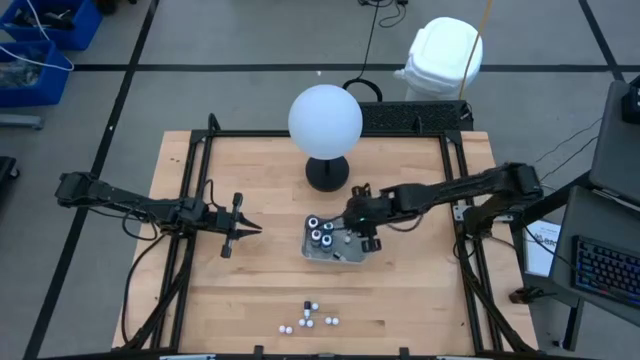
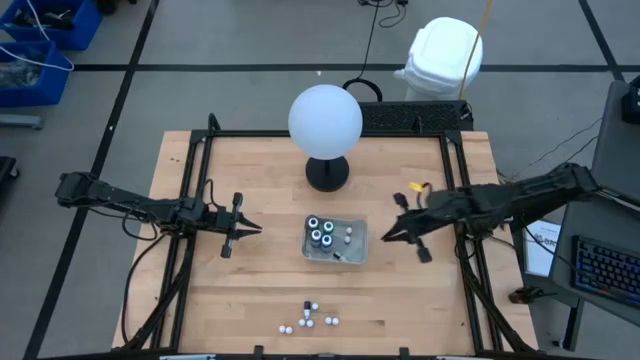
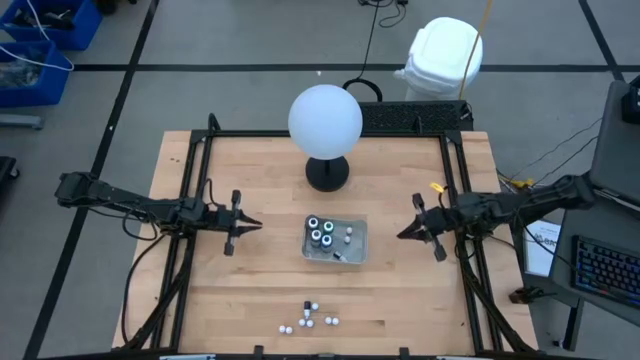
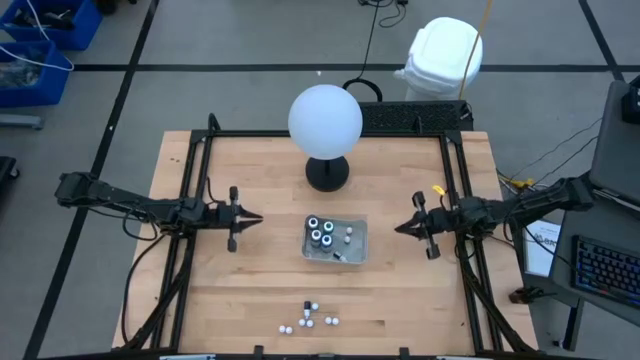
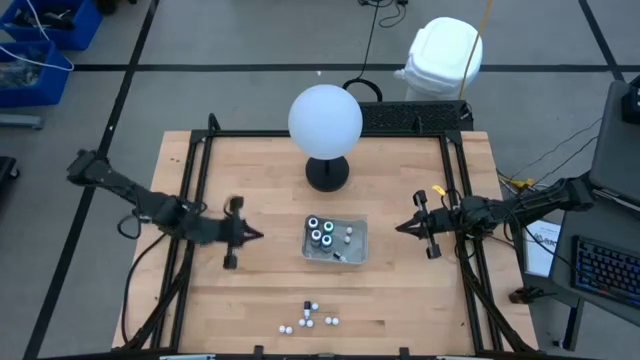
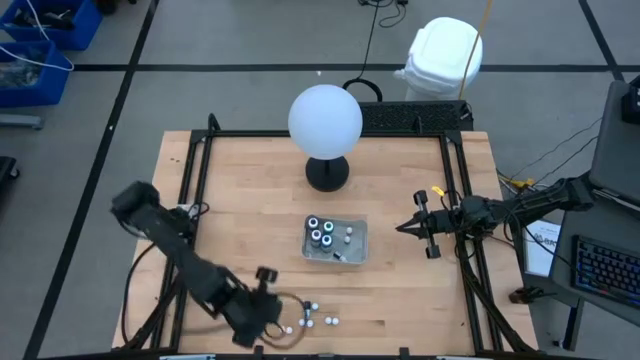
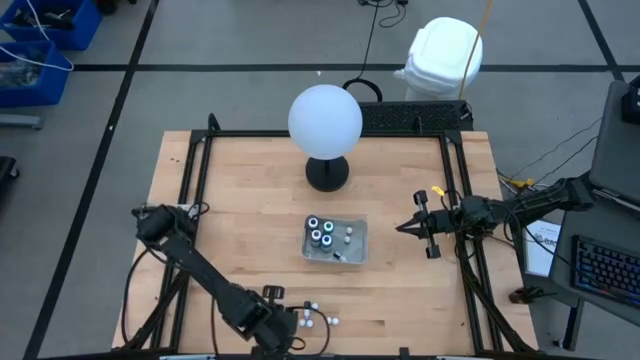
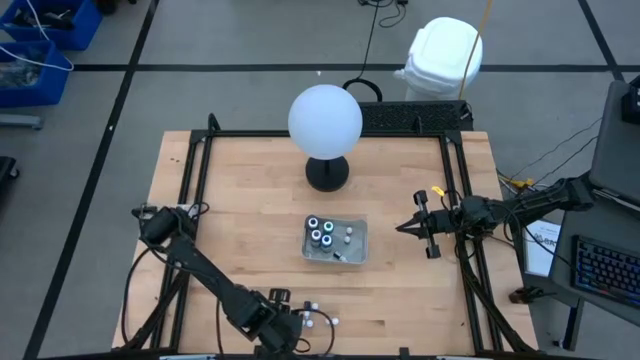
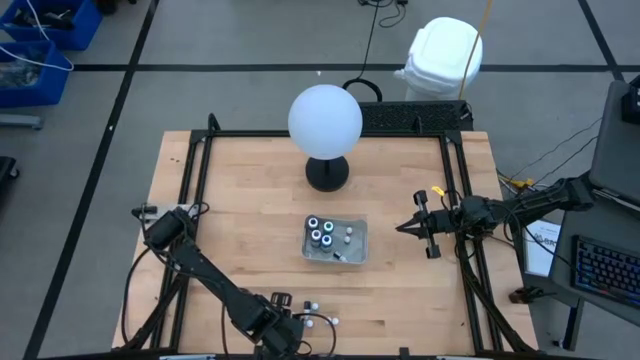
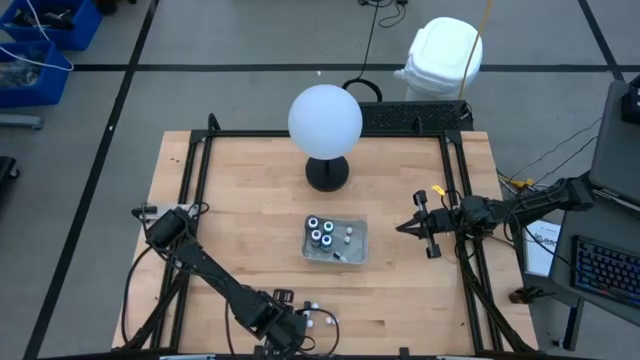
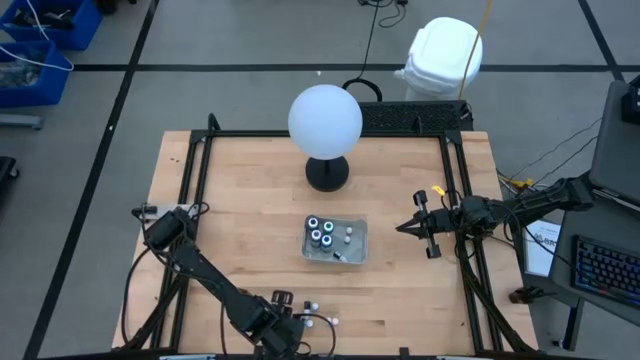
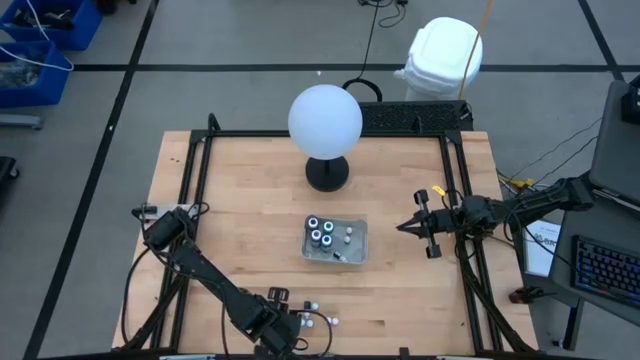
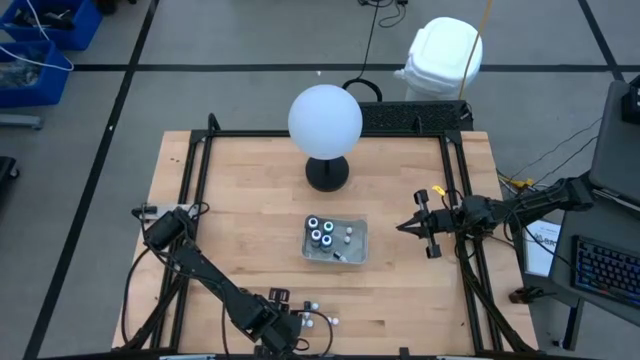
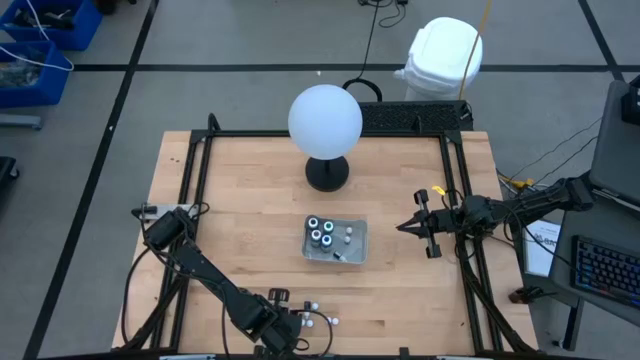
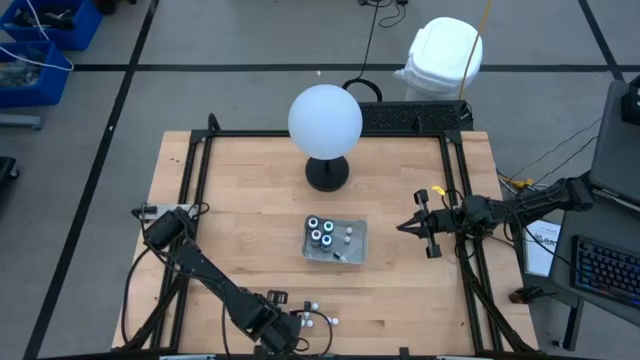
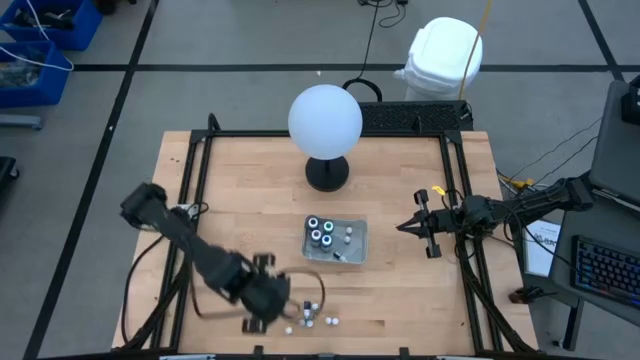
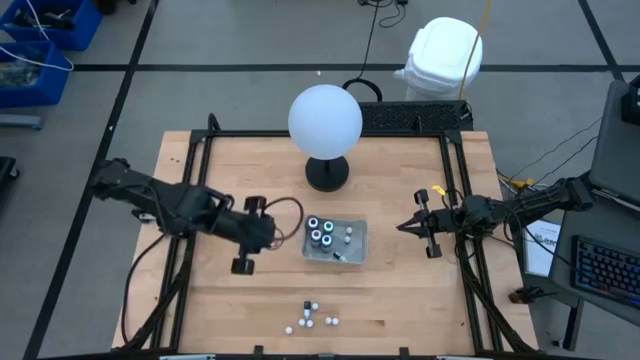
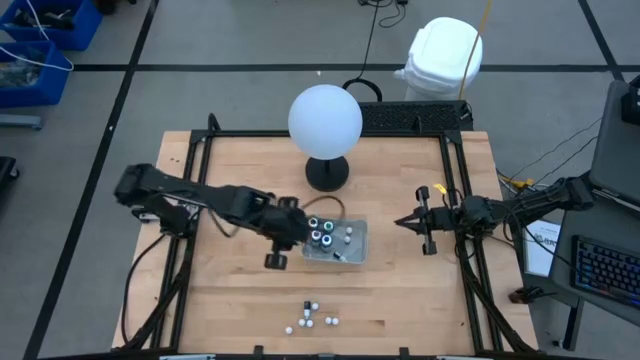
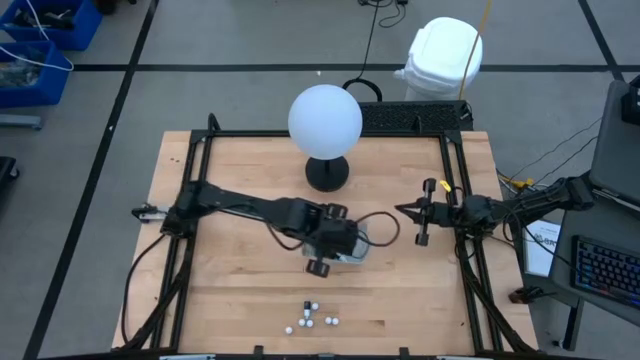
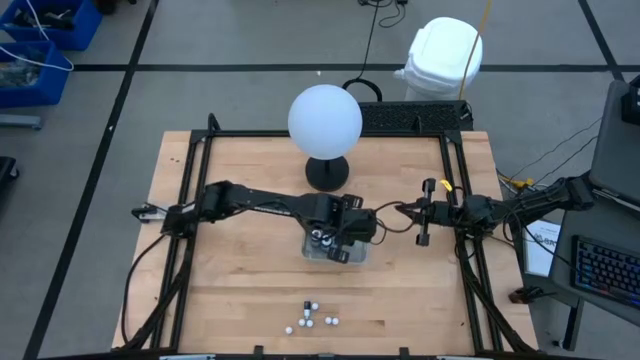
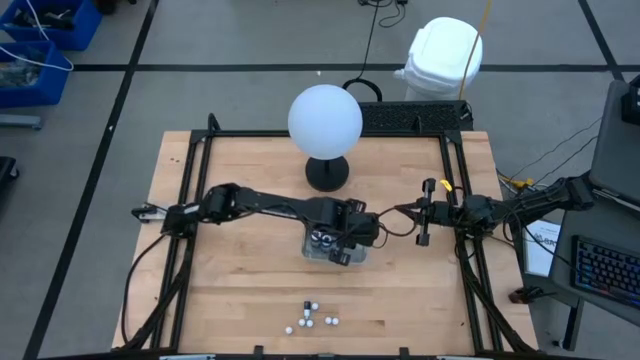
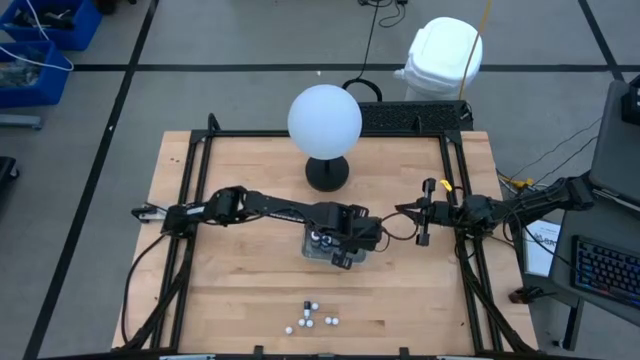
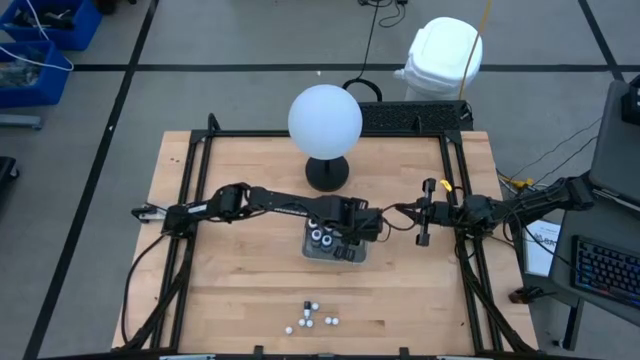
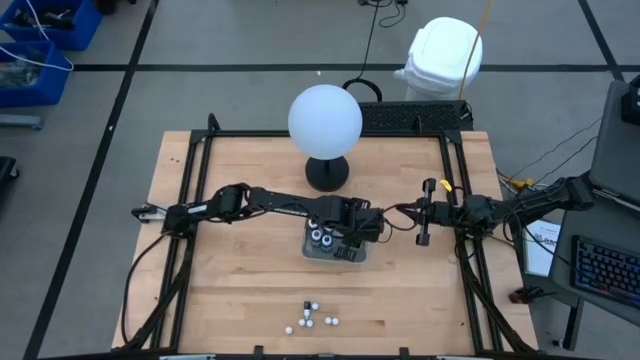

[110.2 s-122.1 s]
Task: Pick & Place food coloring
Put the small orange food coloring bottle into the gray bin

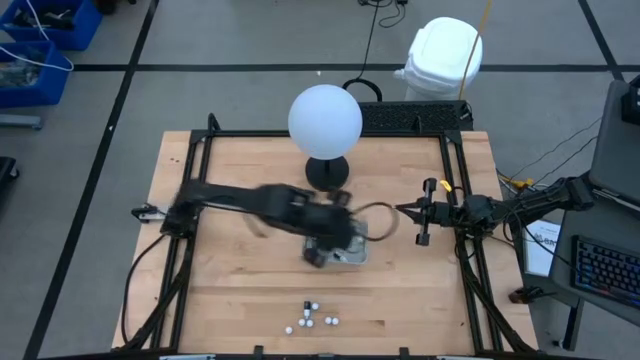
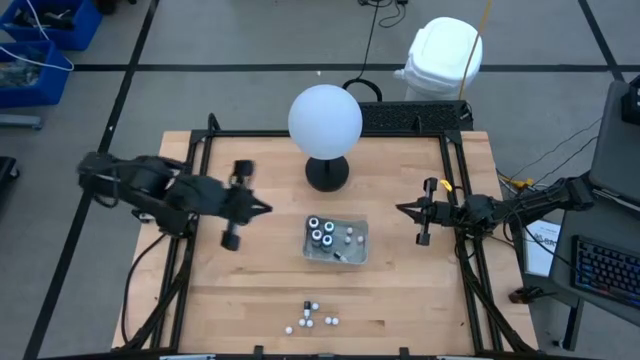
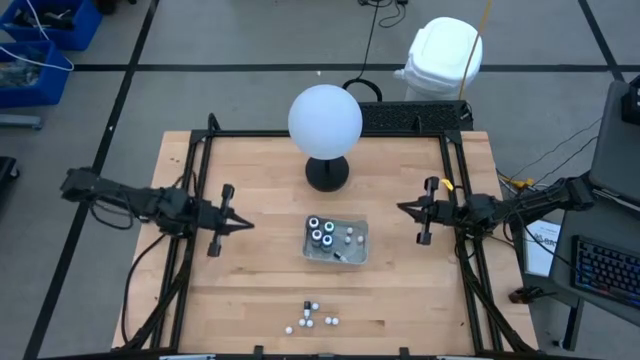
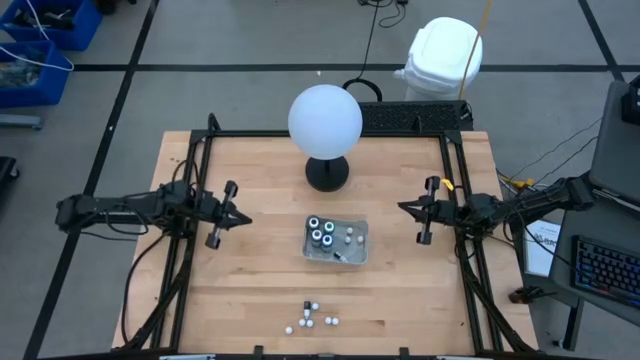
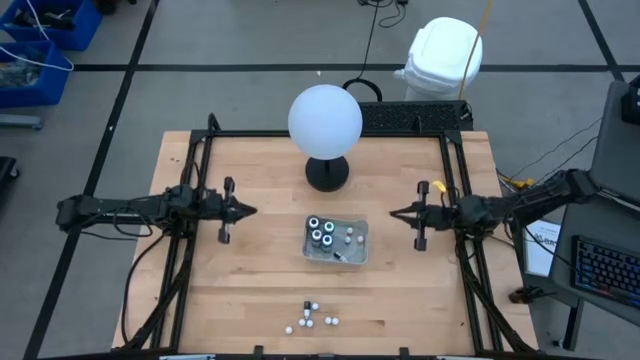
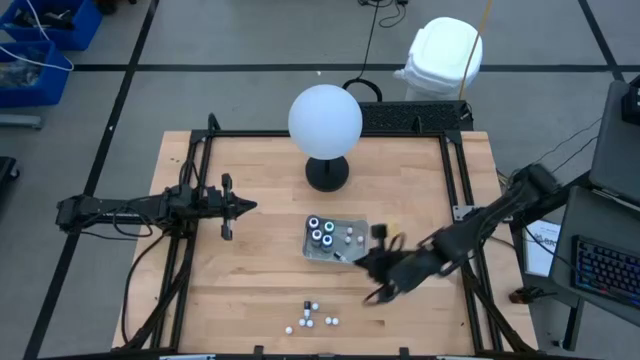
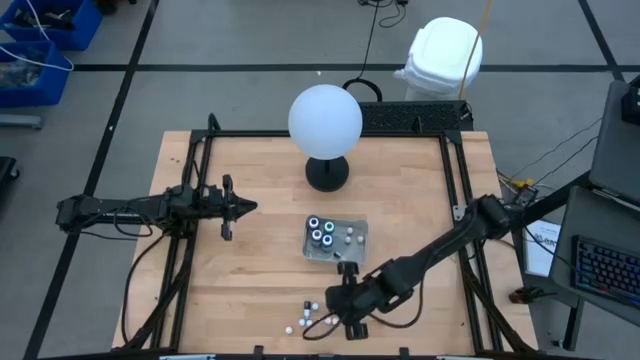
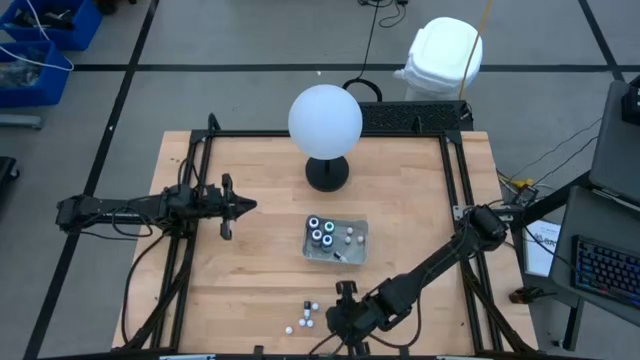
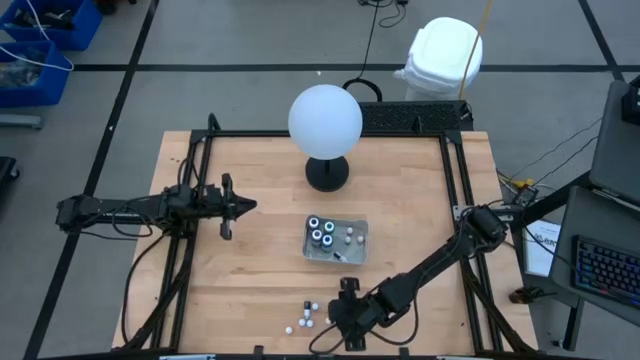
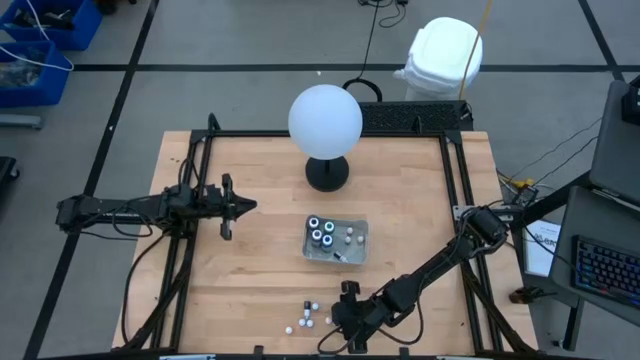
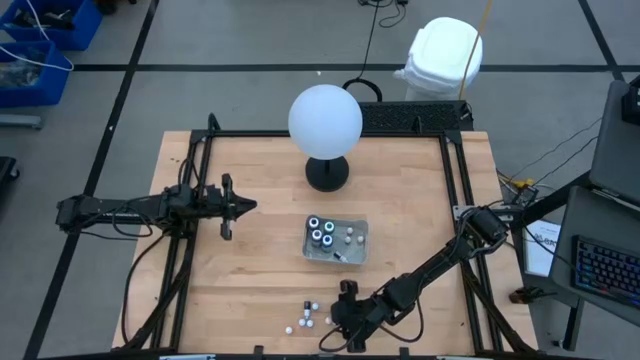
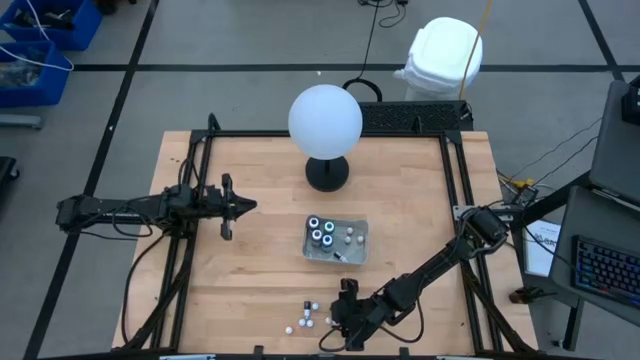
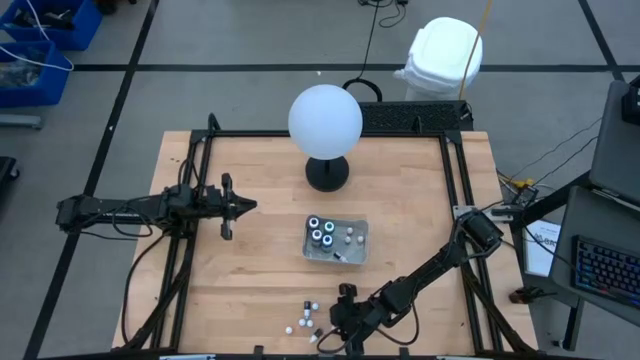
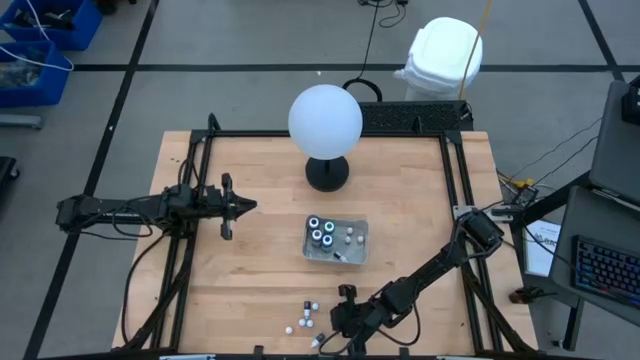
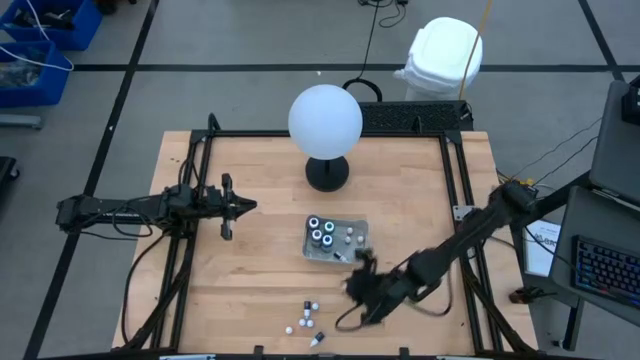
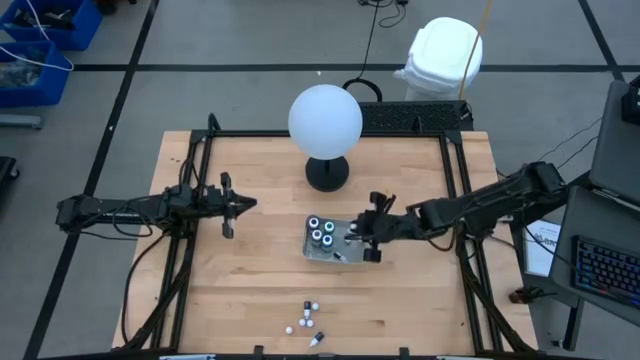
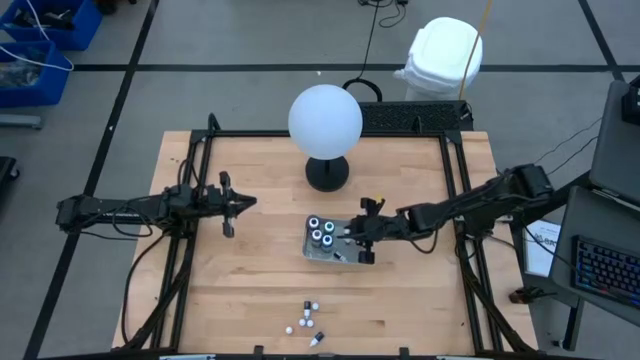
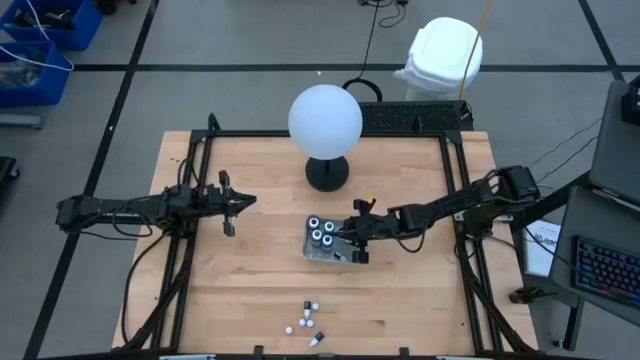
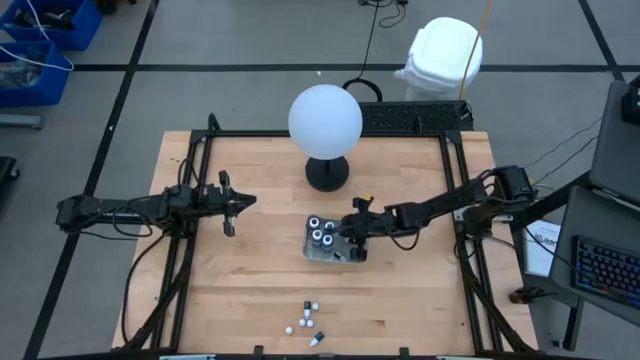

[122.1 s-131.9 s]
Put the small orange food coloring bottle into the gray bin
